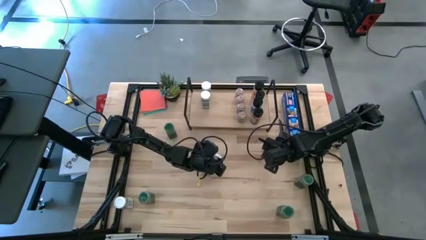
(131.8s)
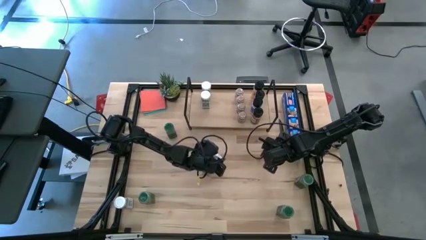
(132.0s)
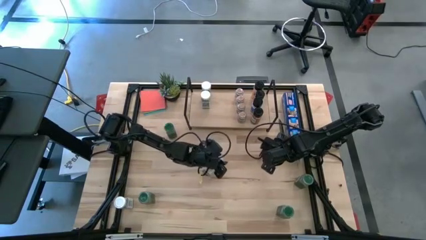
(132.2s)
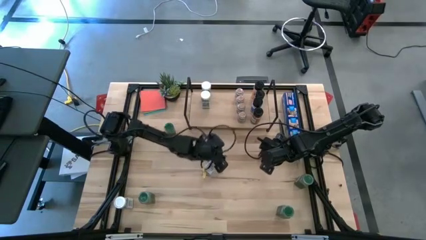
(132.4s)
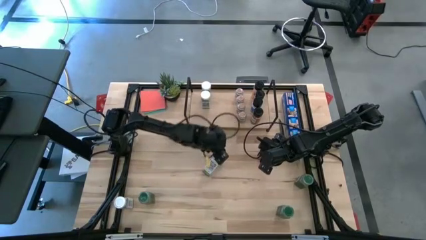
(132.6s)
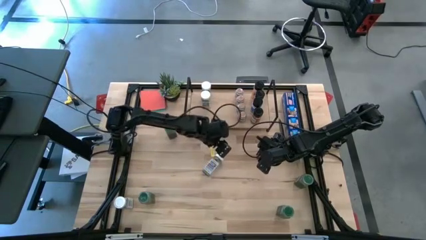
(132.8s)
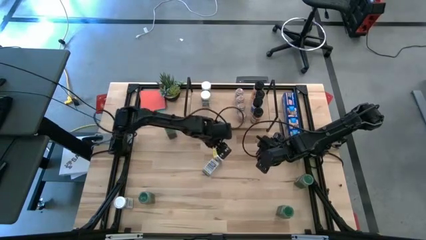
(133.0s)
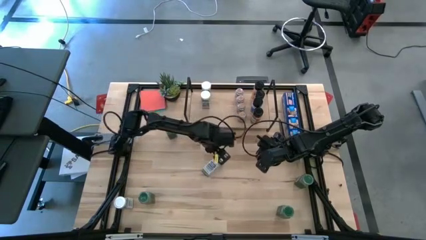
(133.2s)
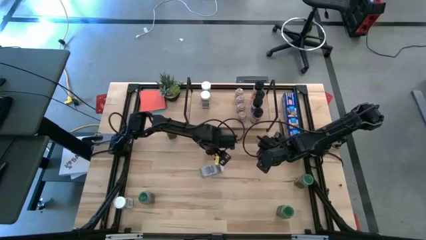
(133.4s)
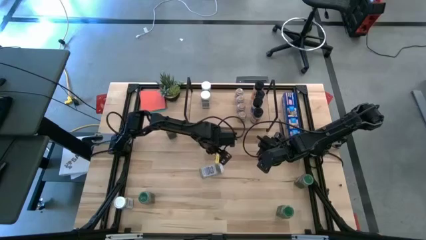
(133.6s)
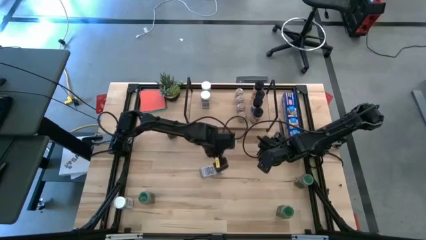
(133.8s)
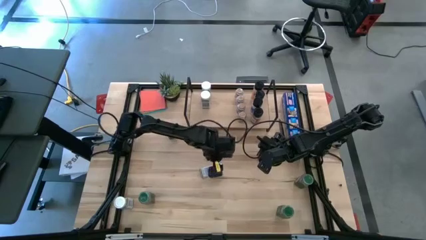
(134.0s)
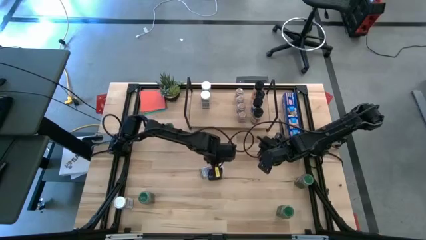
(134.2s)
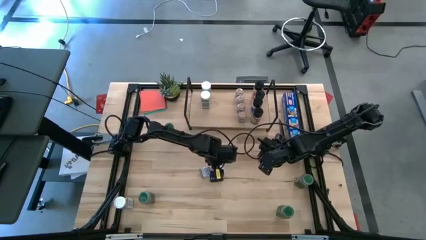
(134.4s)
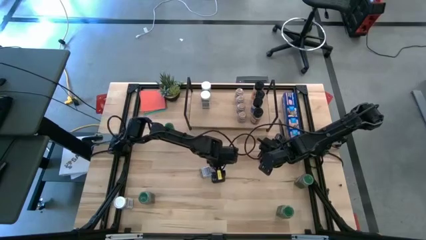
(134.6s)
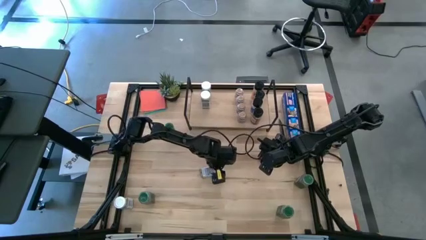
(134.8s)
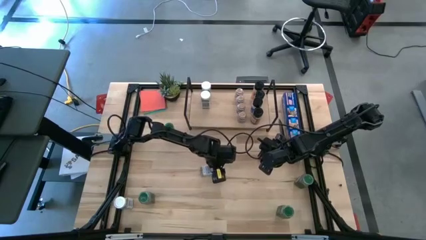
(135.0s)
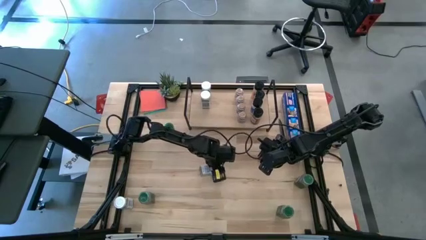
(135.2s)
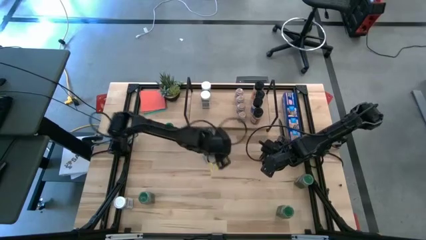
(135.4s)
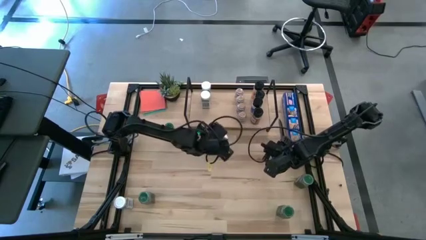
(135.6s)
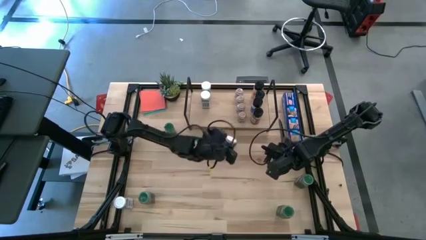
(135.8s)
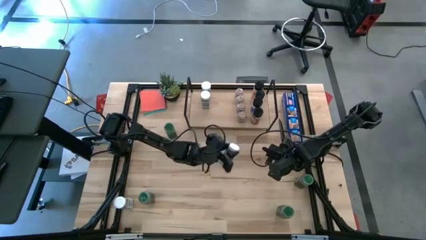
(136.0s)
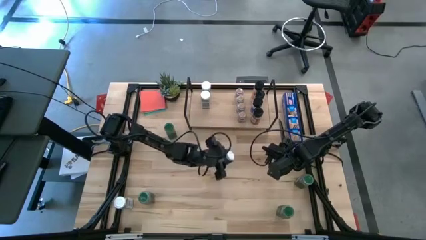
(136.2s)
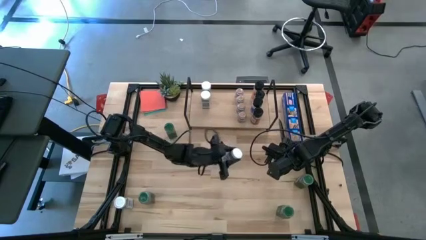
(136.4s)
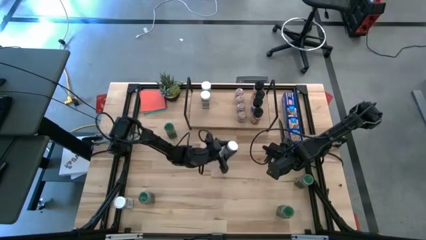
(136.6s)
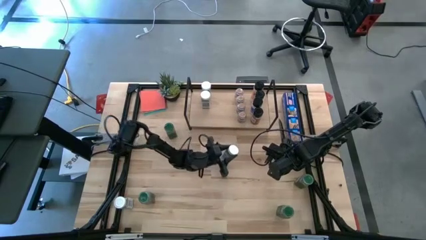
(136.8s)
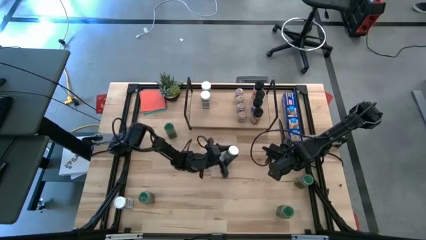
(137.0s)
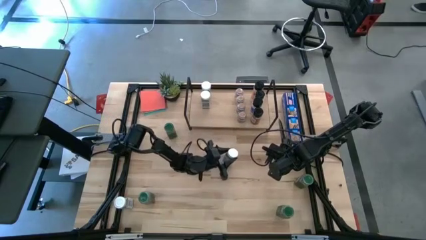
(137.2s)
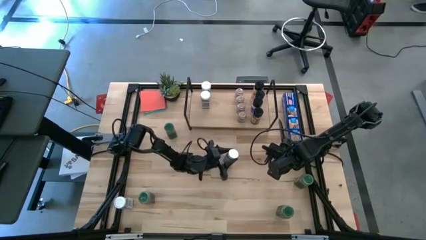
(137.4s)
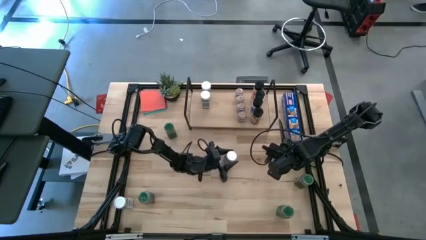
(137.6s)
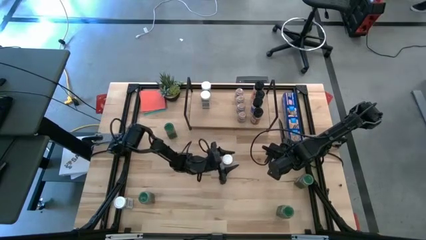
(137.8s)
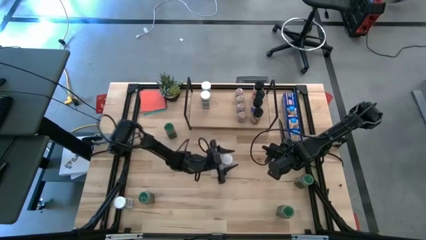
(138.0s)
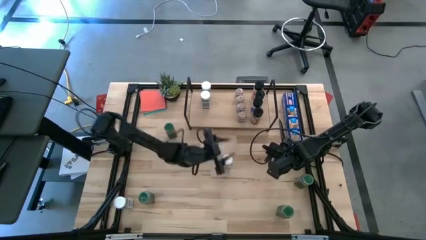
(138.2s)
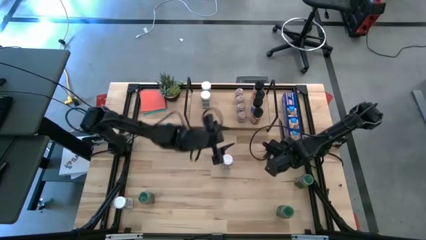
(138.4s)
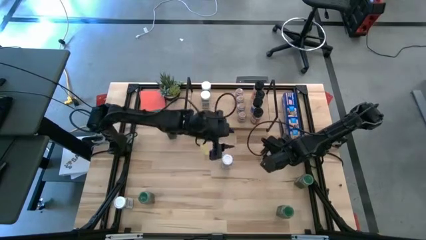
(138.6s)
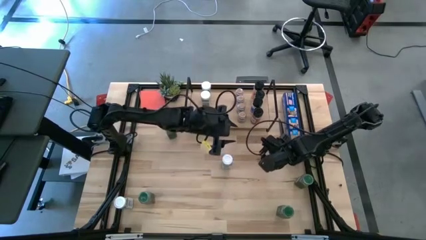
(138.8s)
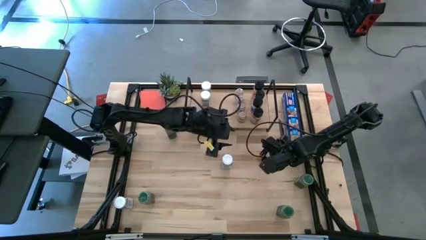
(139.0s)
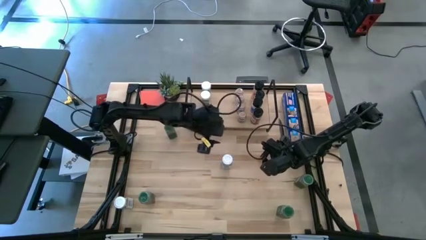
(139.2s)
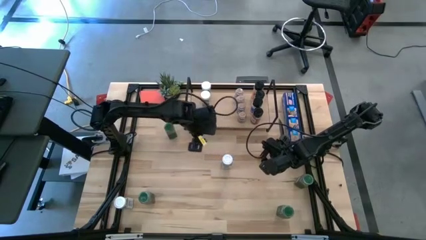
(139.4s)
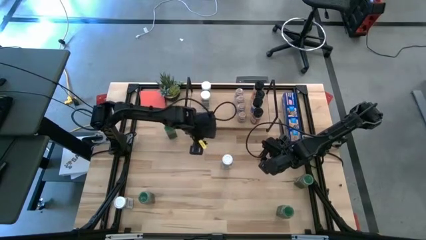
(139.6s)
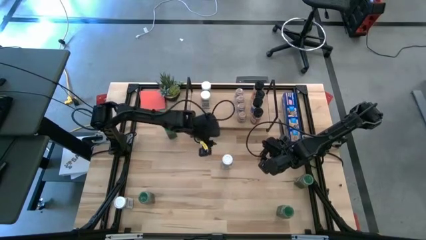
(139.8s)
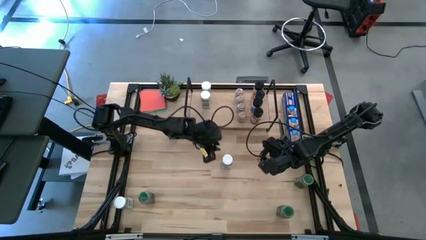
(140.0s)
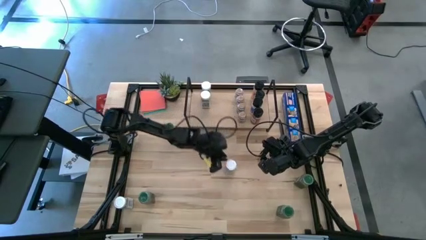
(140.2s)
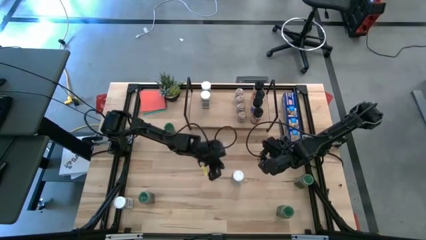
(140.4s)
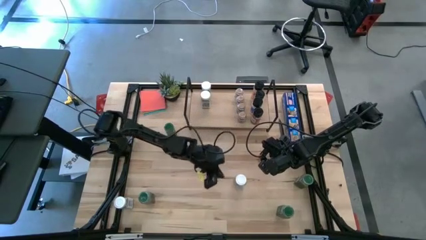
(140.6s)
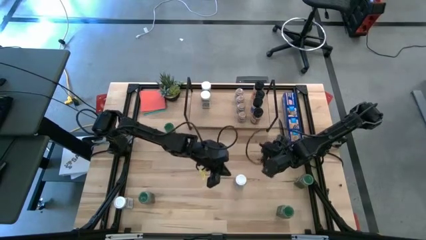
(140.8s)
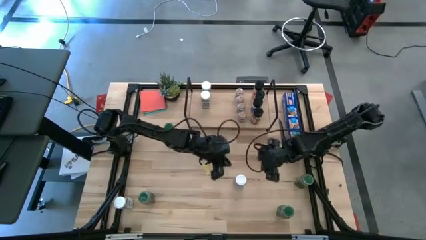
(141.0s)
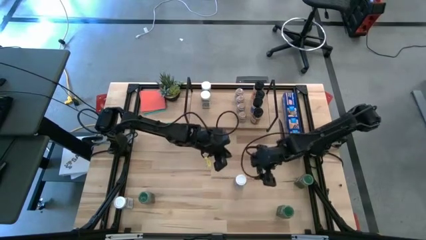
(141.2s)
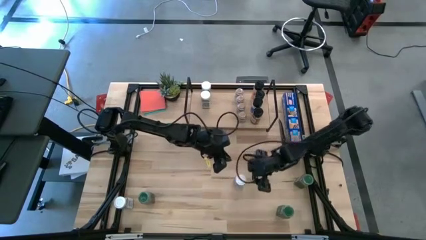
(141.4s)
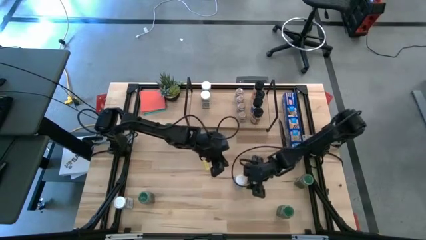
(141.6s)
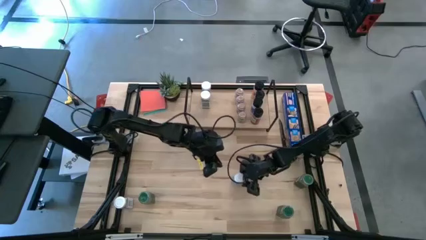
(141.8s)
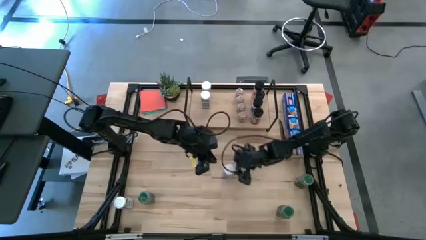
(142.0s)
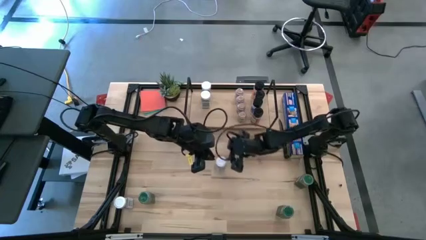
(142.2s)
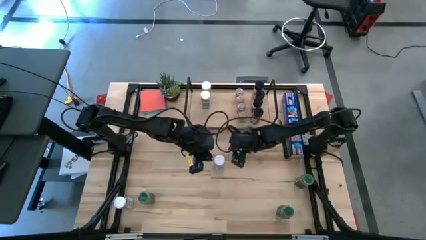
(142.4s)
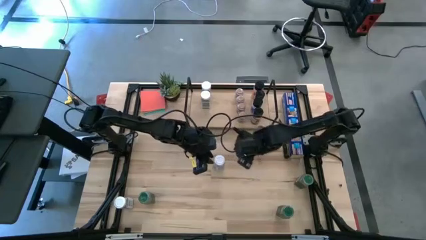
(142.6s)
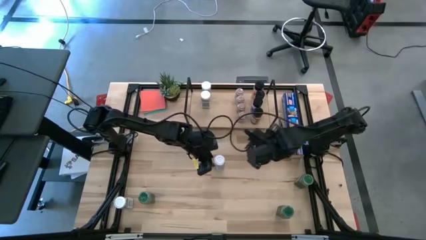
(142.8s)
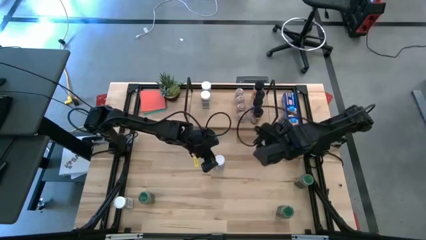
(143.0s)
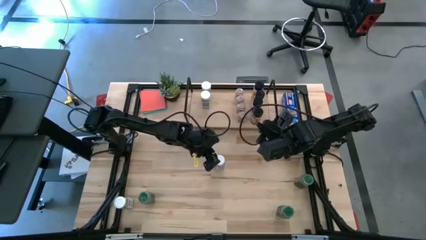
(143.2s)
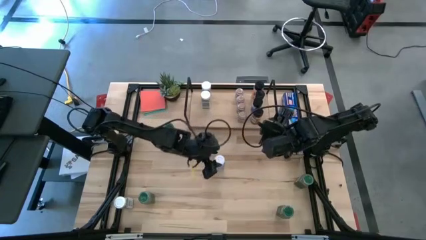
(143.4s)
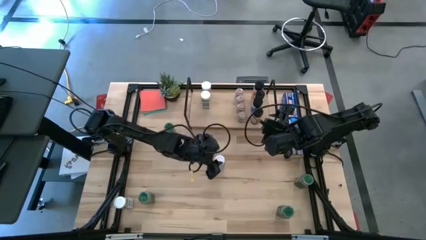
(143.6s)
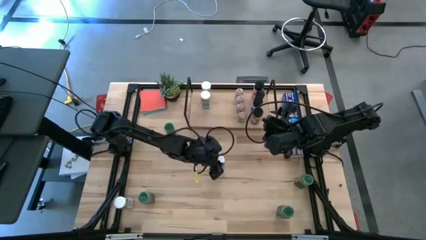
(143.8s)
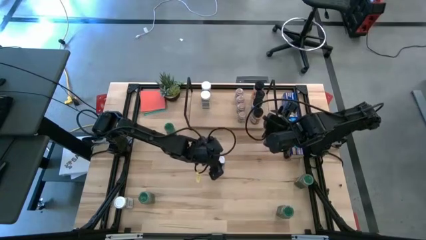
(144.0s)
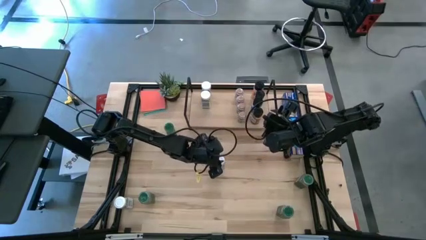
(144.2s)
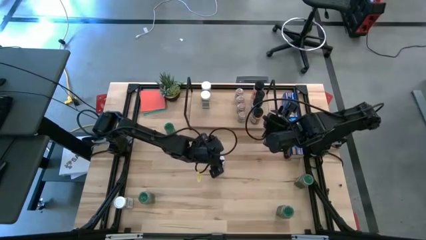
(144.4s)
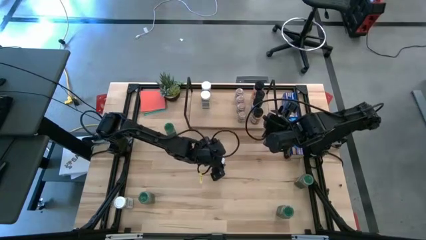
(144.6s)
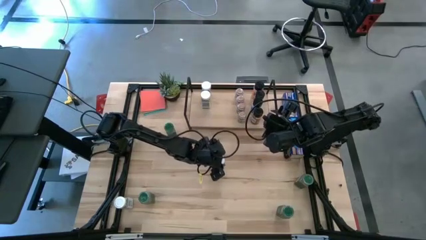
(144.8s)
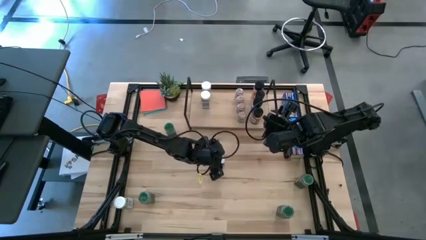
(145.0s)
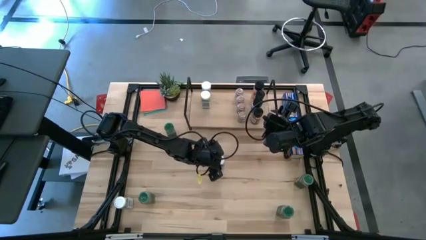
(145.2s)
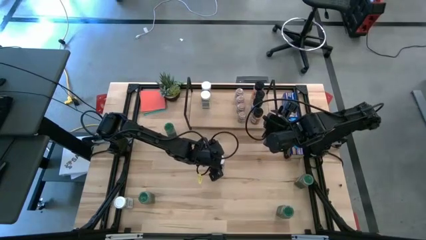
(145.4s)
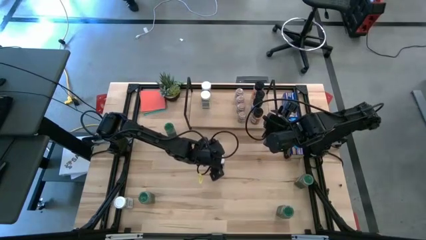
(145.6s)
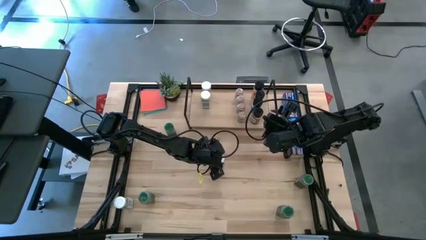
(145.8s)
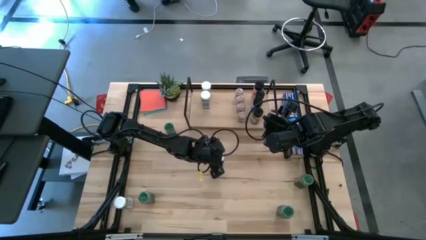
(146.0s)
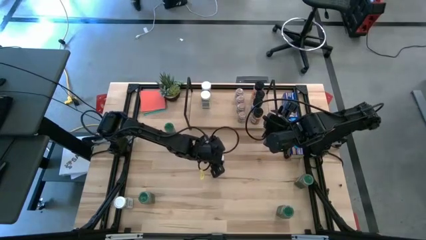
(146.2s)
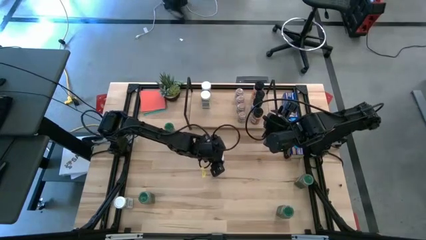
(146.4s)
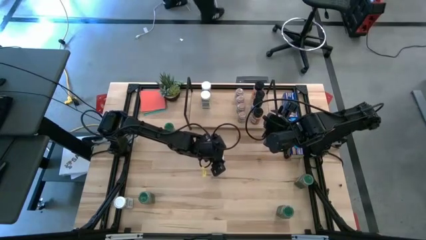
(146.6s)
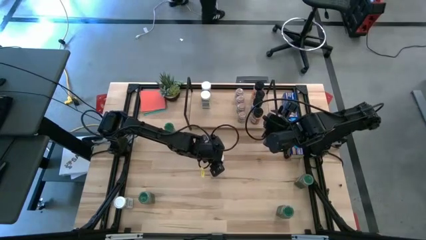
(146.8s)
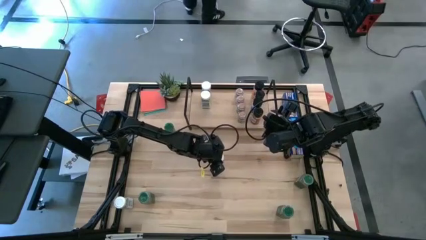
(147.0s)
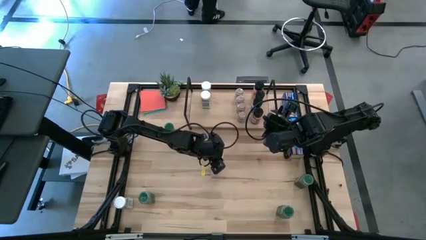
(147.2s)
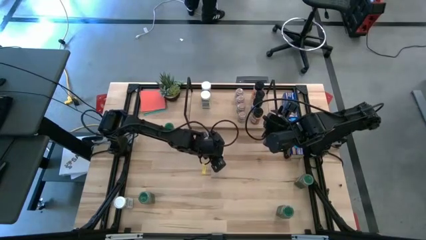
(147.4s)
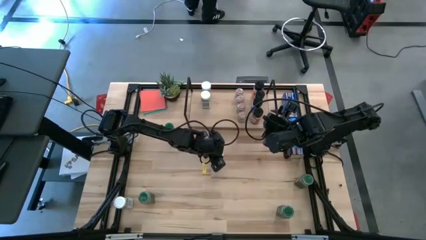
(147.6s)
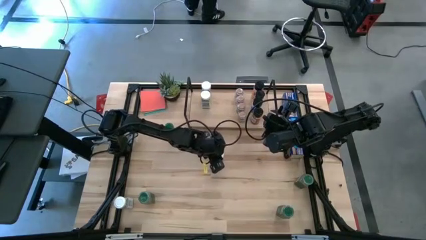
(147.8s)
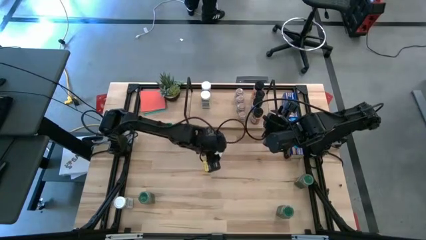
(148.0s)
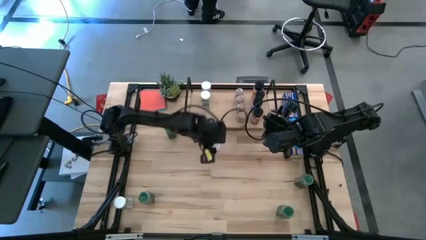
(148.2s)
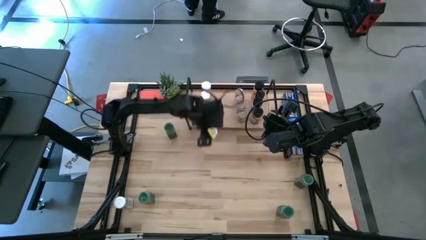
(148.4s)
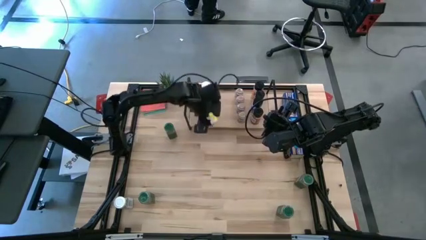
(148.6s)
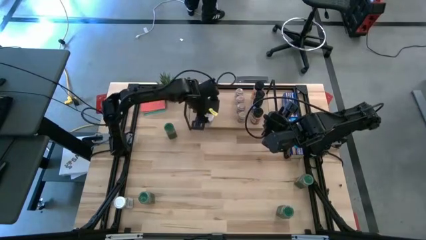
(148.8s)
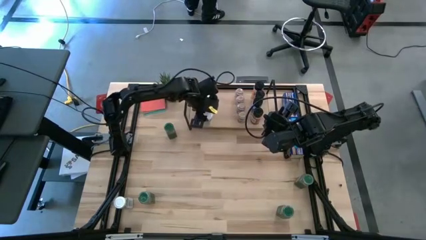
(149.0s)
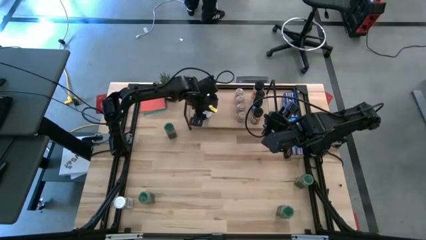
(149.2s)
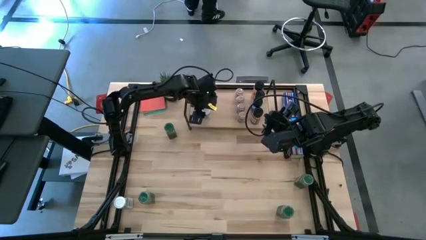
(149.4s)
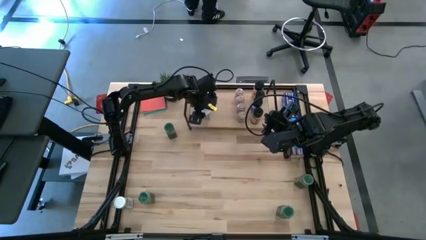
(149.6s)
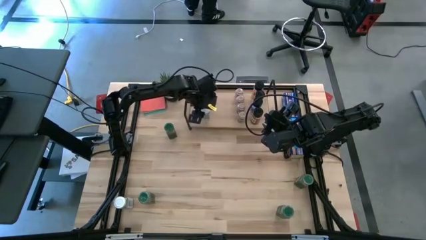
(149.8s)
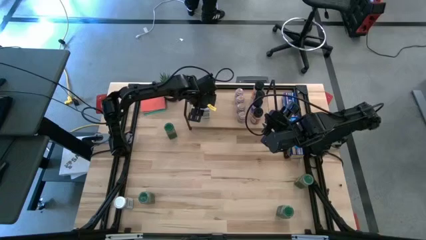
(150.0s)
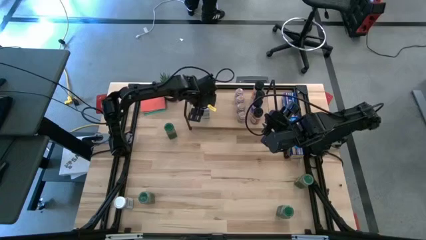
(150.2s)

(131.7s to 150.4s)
Task: Shelf spices
Put the white seasoning bottle on the shelf, aligned with the other white seasoning bottle
